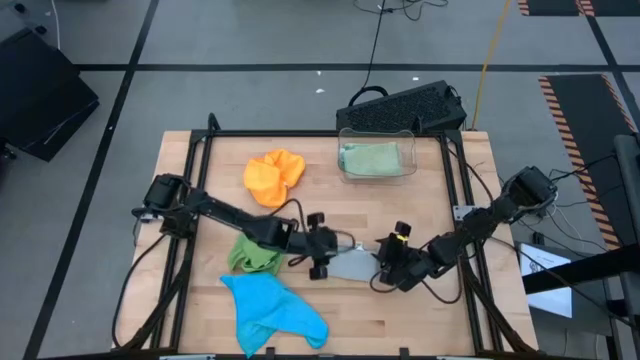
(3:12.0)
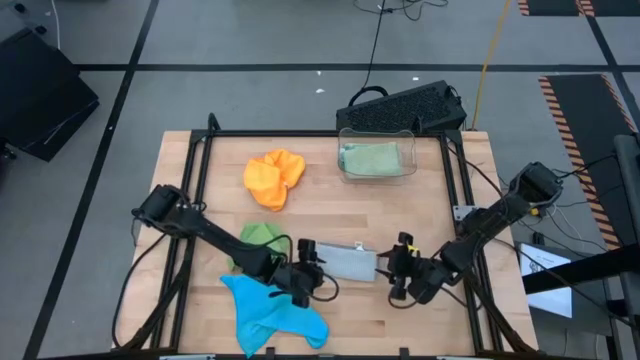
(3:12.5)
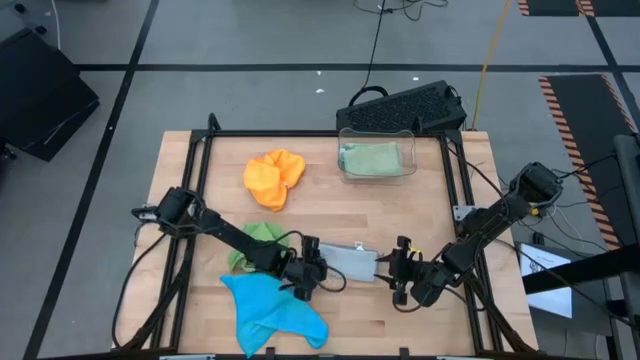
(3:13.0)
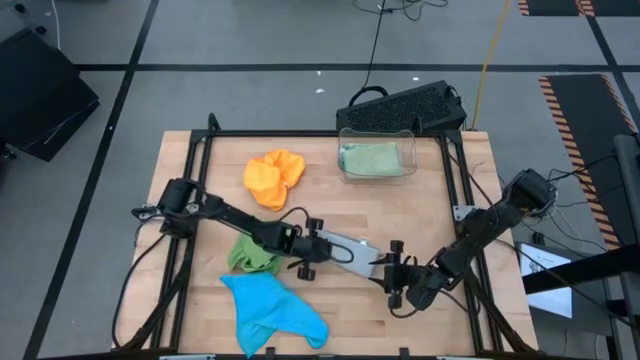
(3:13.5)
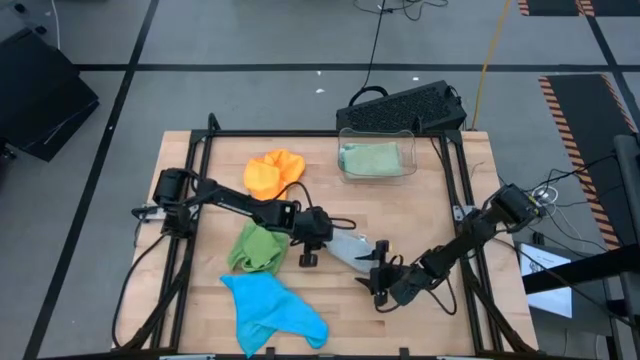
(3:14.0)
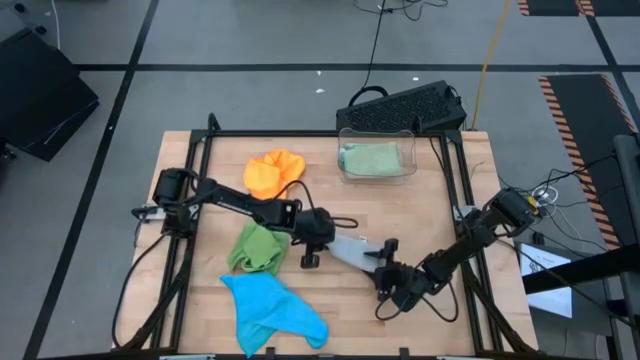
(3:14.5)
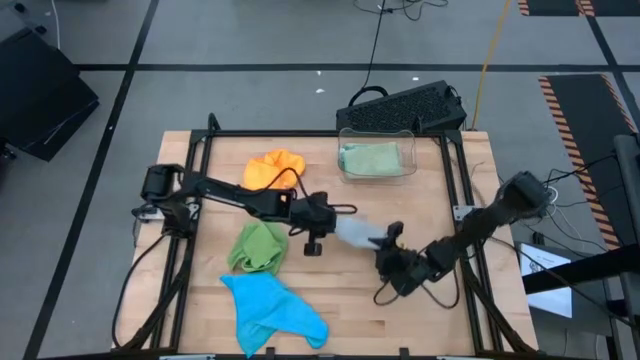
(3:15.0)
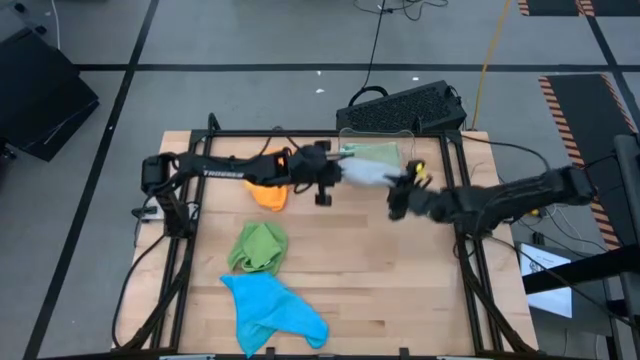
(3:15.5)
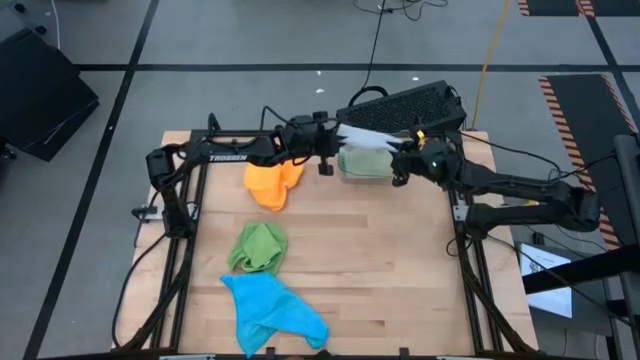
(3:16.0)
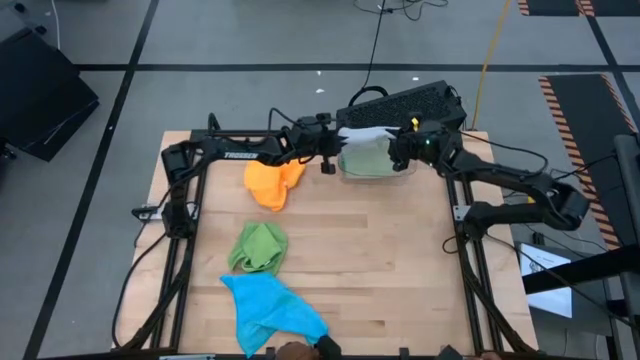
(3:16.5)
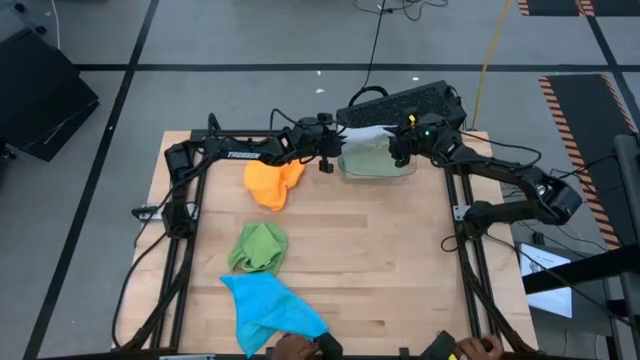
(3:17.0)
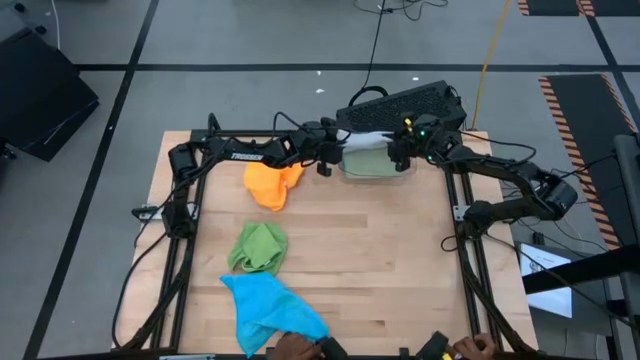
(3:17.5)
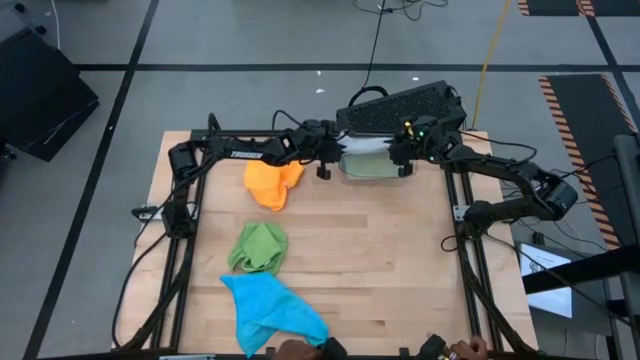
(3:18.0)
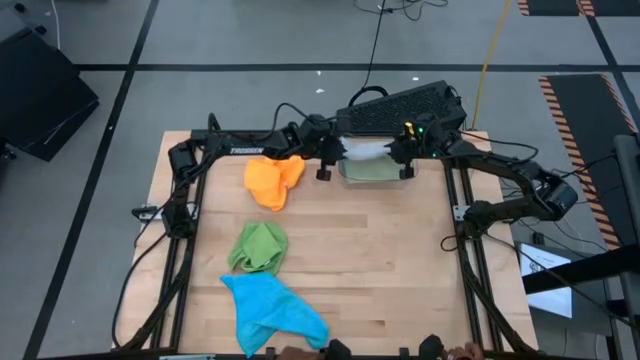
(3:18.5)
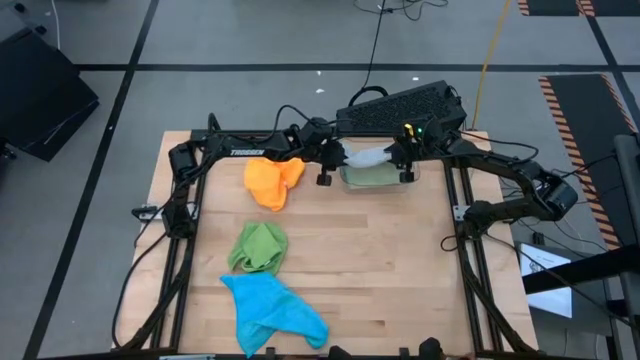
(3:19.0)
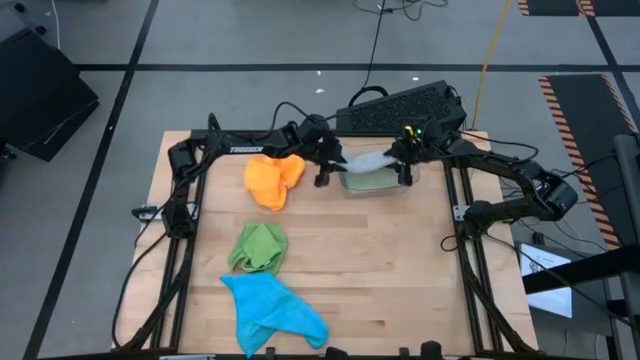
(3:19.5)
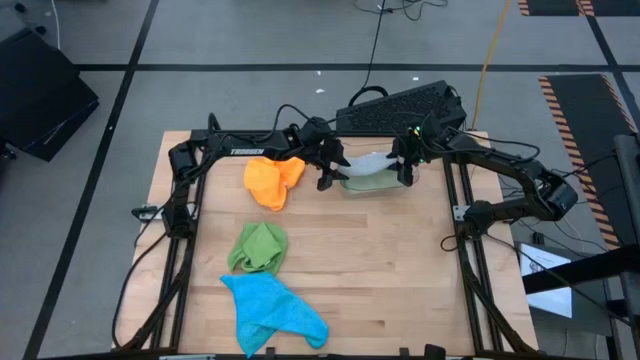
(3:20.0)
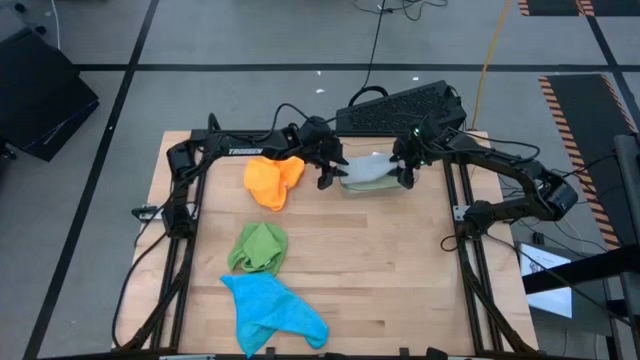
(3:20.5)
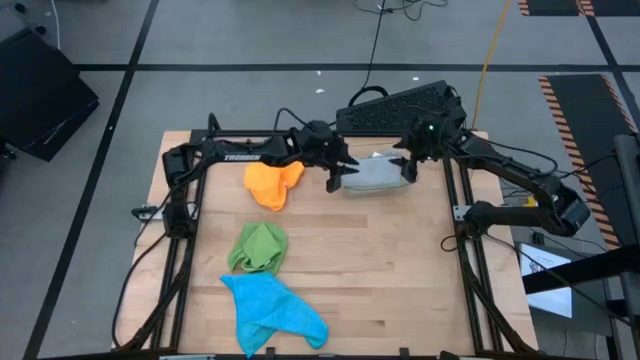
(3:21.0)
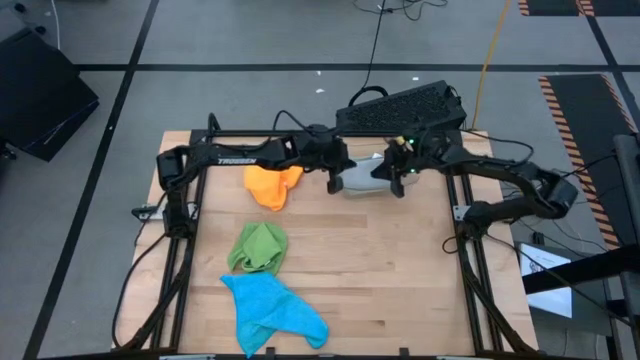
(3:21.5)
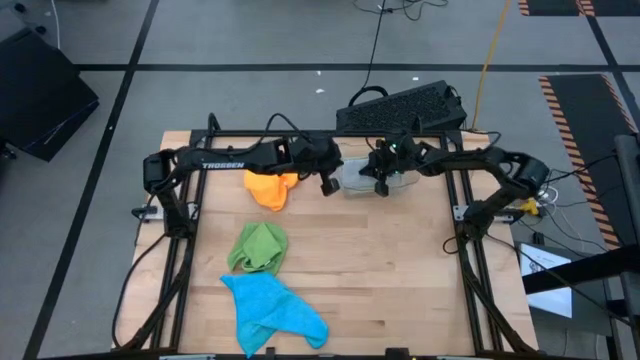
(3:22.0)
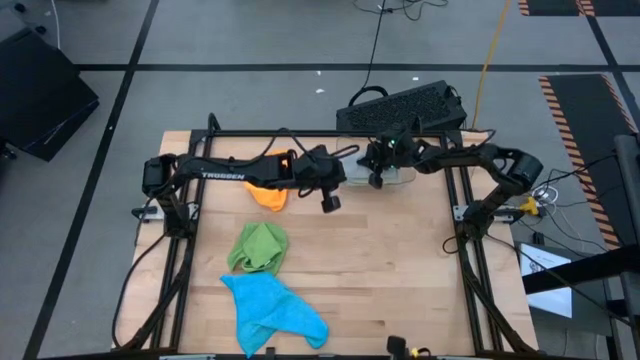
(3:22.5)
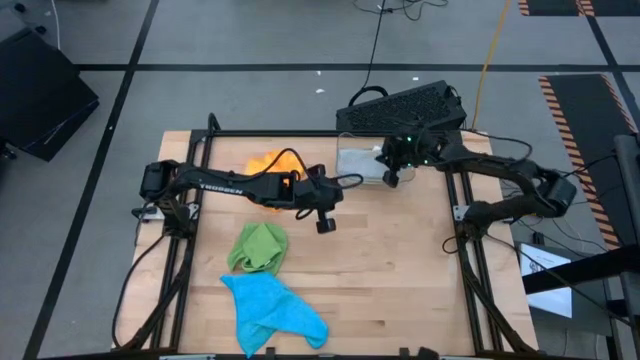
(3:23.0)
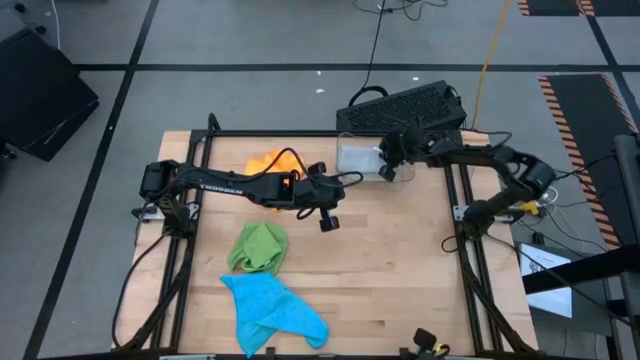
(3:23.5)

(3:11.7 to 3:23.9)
Task: Fold microfiber towels
Put the folded gray microfiber towel into the transparent bin

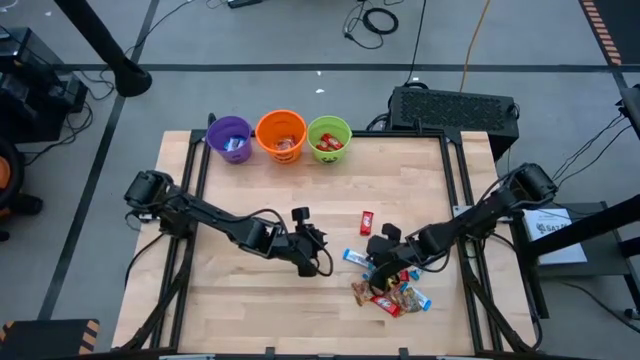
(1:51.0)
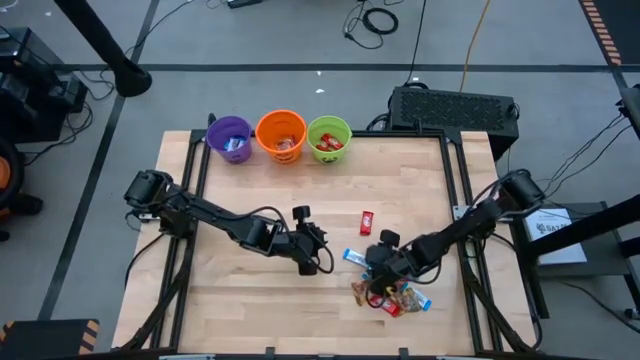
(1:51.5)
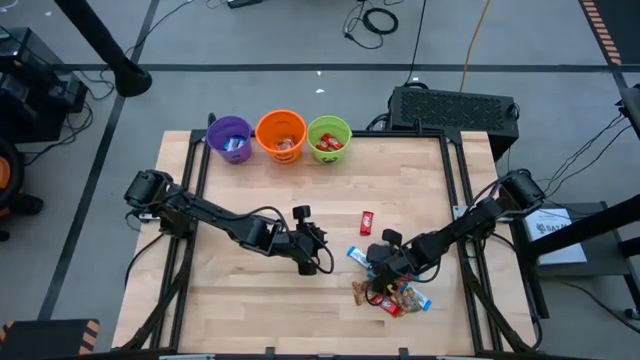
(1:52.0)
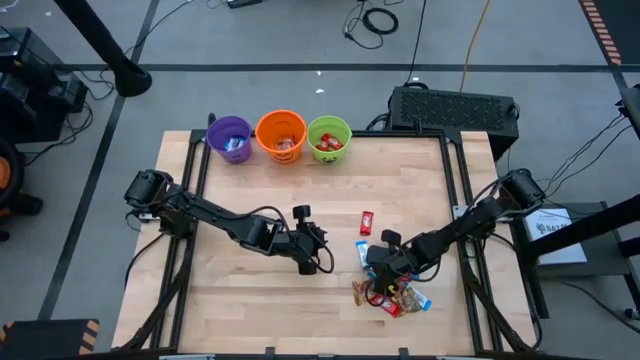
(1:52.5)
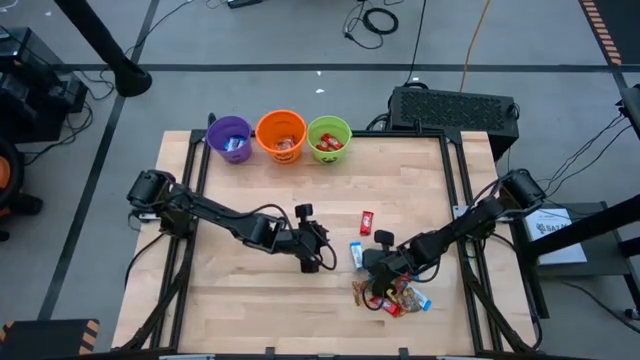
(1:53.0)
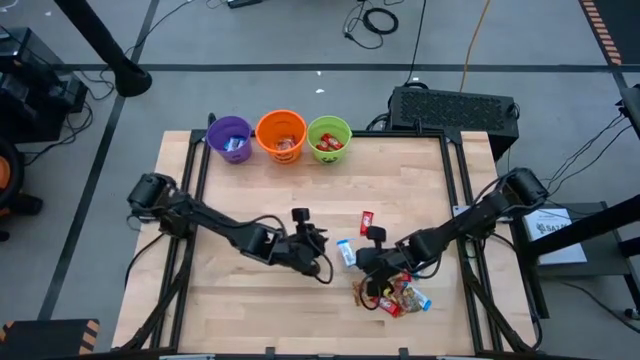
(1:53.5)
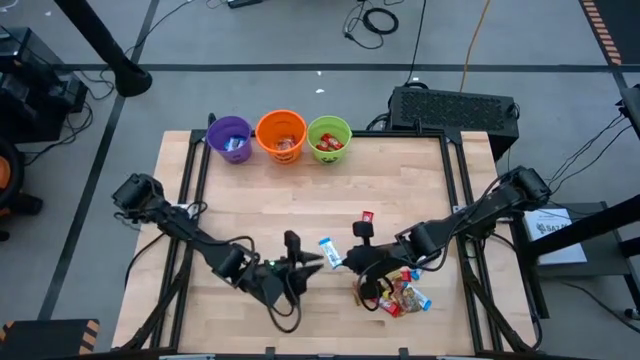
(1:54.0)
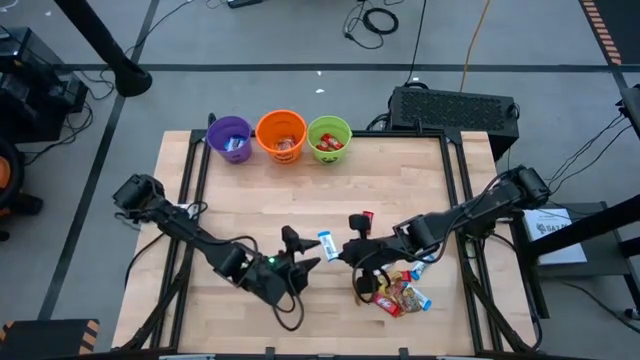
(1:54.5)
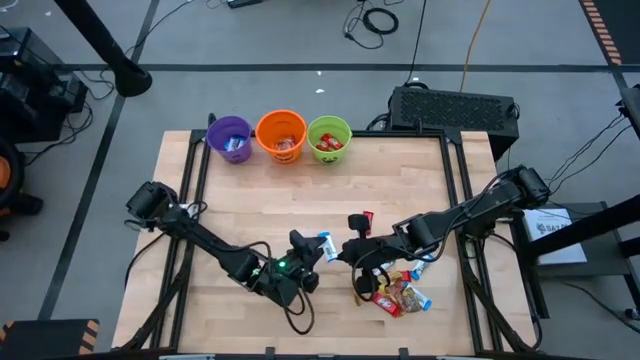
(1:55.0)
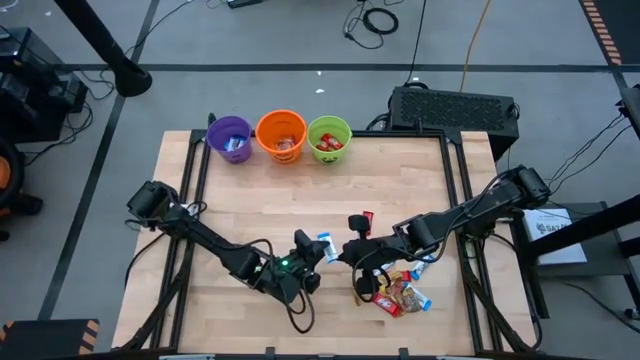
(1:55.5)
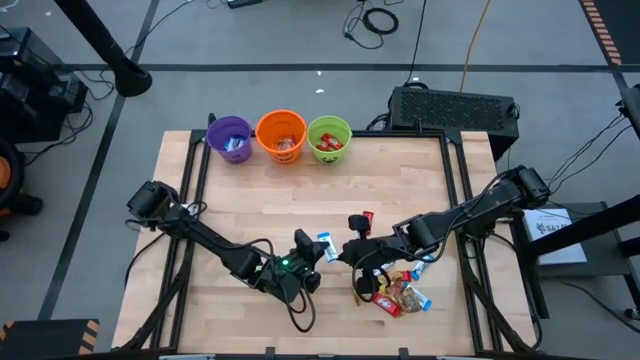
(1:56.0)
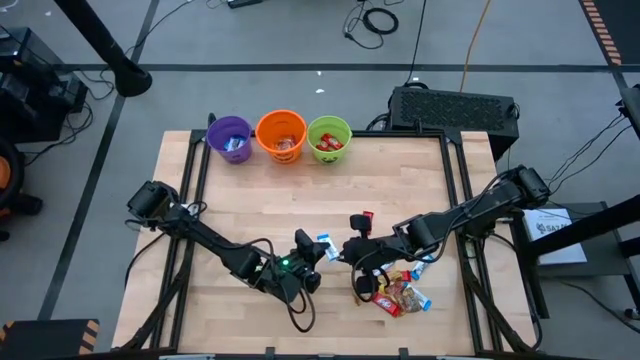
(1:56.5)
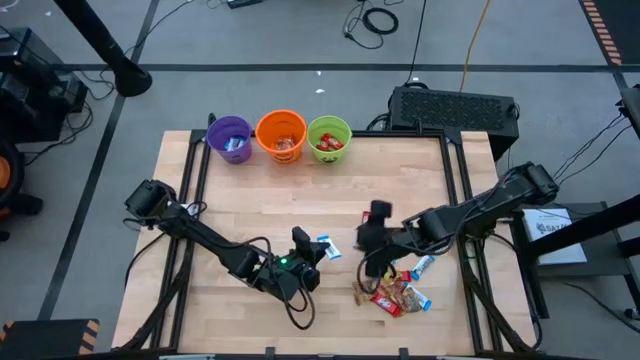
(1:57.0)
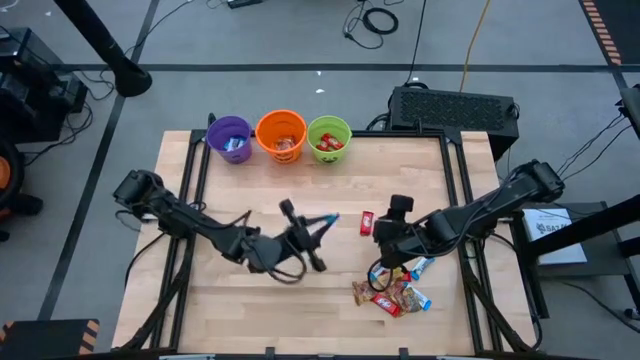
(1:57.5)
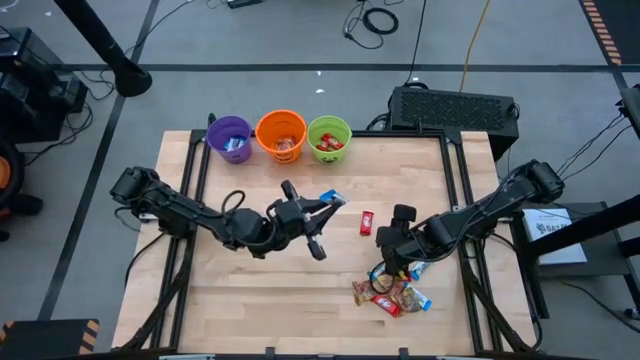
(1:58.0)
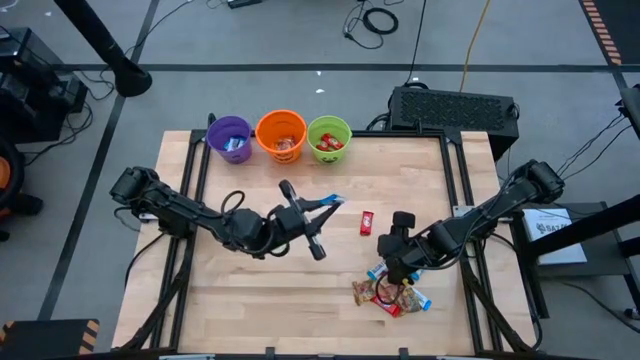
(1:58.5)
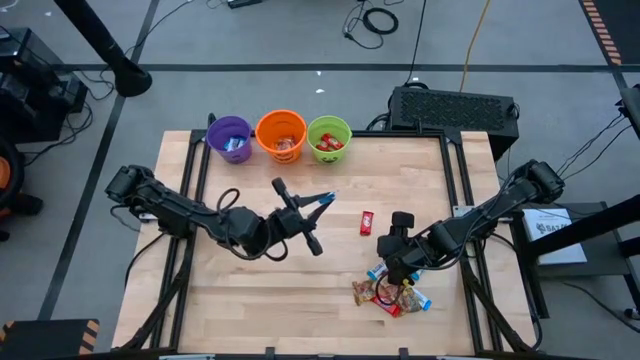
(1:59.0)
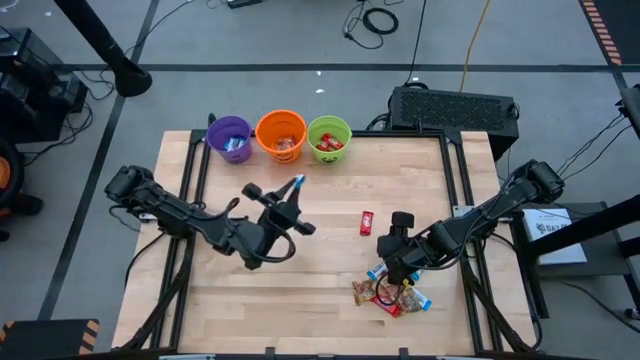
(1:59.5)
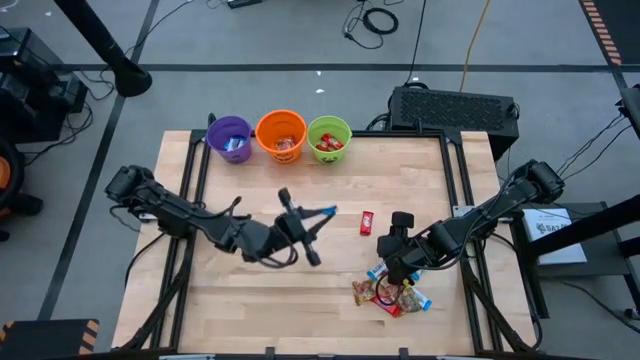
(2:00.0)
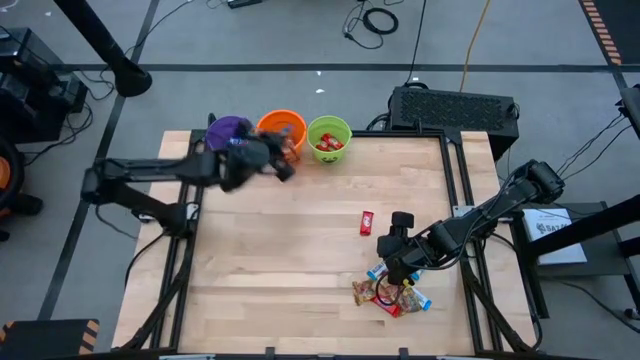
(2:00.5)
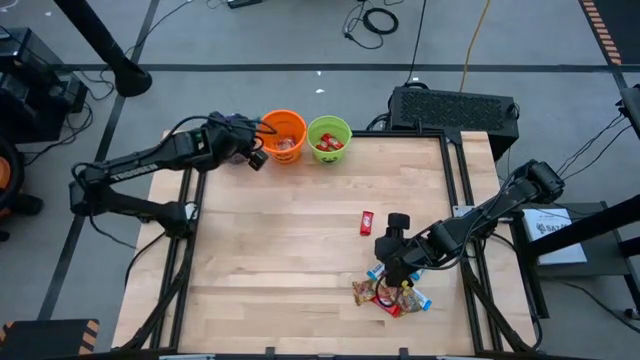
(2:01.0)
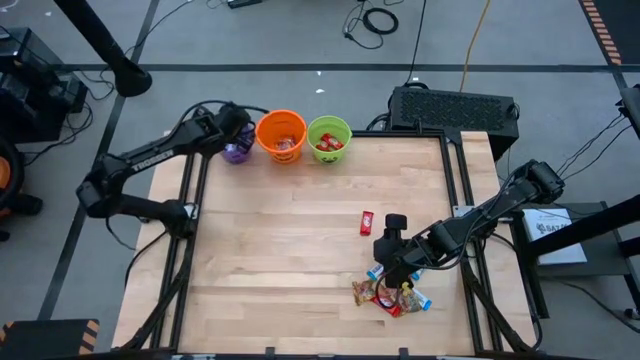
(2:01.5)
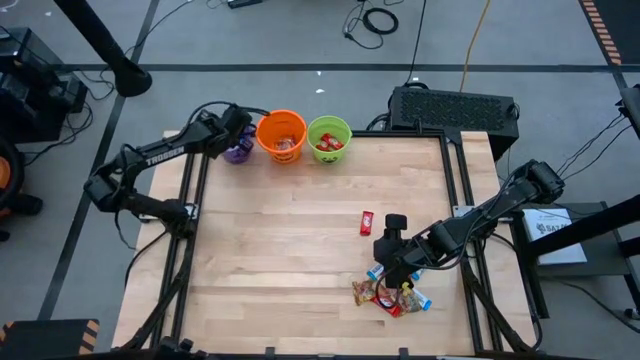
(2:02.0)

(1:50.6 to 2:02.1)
Task: Sort candy by brand, put in halloween buckets
Put the white chocolate bar into the violet bucket
